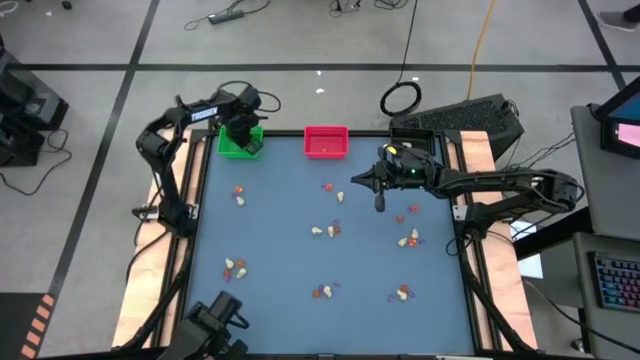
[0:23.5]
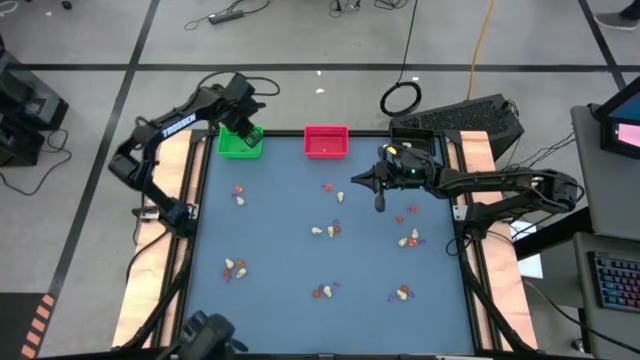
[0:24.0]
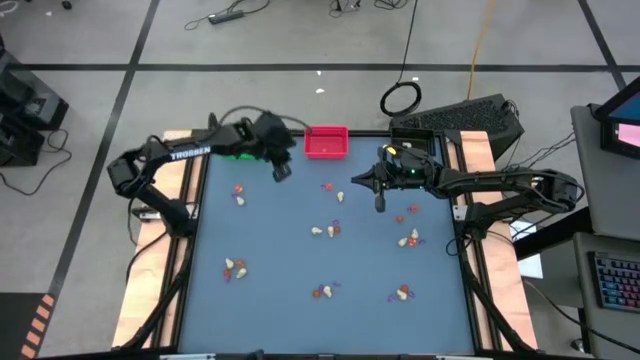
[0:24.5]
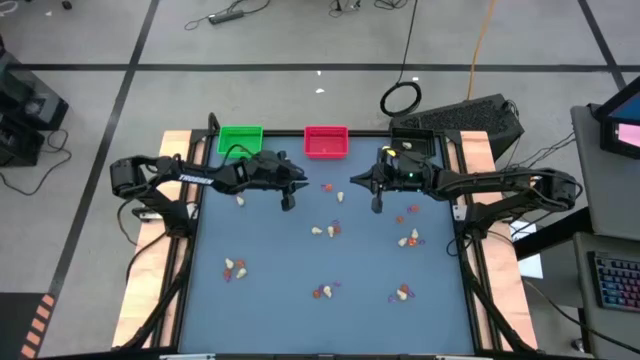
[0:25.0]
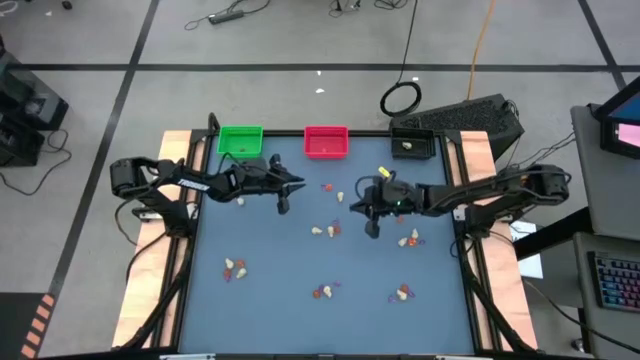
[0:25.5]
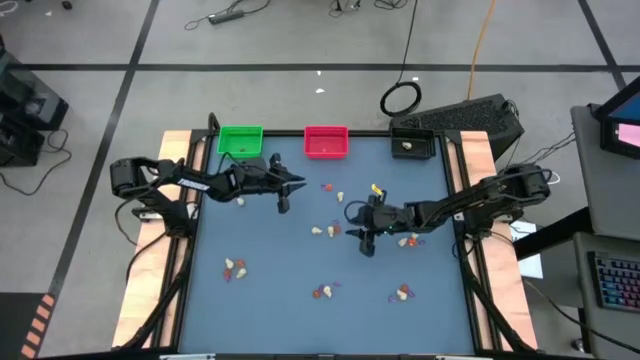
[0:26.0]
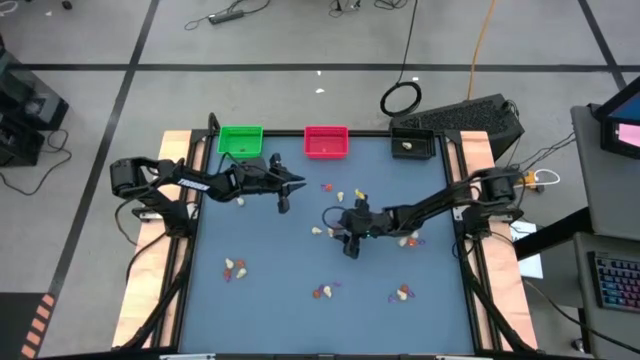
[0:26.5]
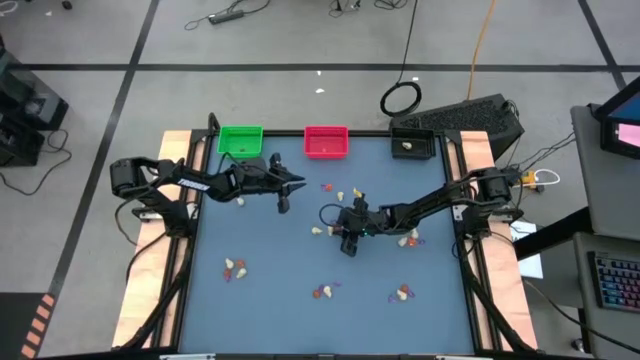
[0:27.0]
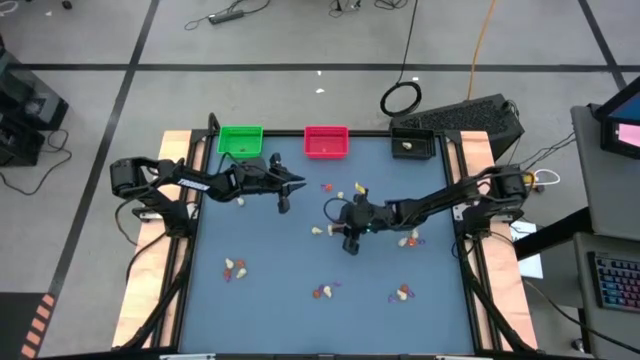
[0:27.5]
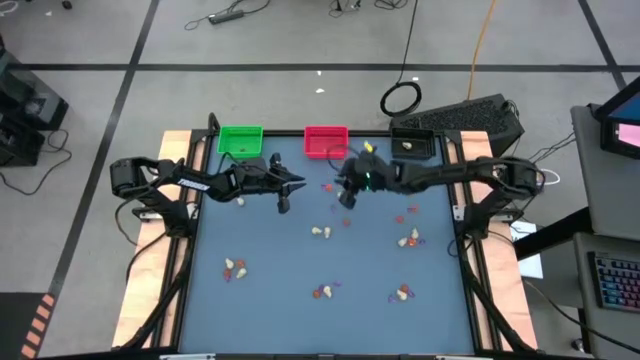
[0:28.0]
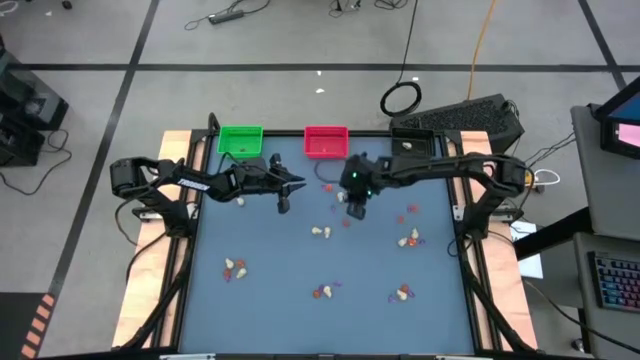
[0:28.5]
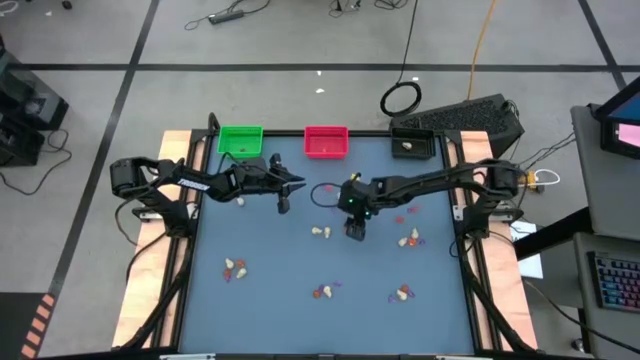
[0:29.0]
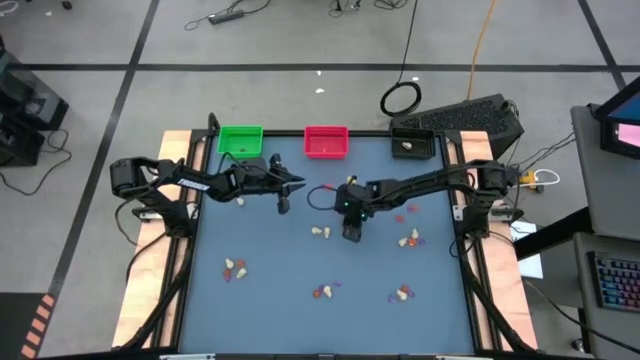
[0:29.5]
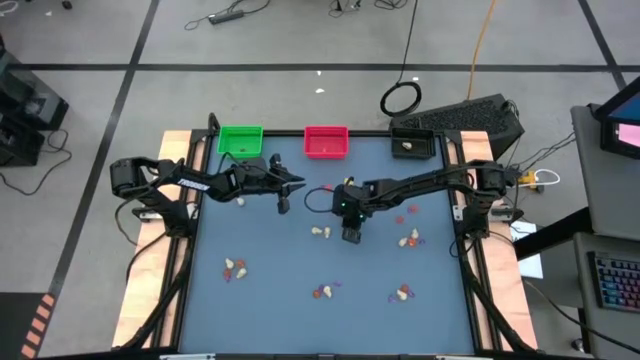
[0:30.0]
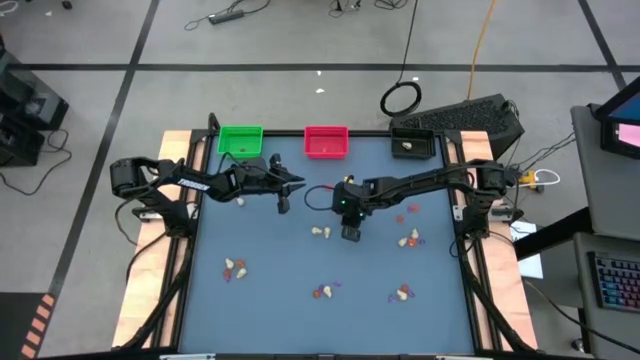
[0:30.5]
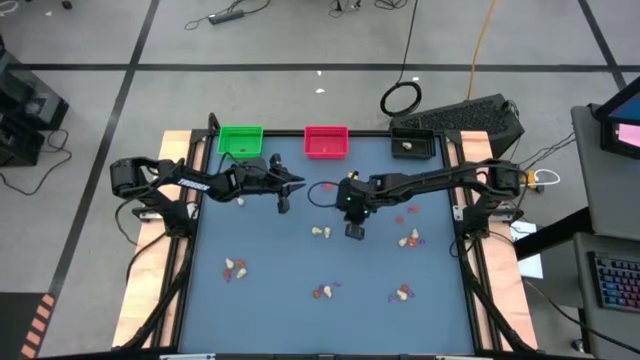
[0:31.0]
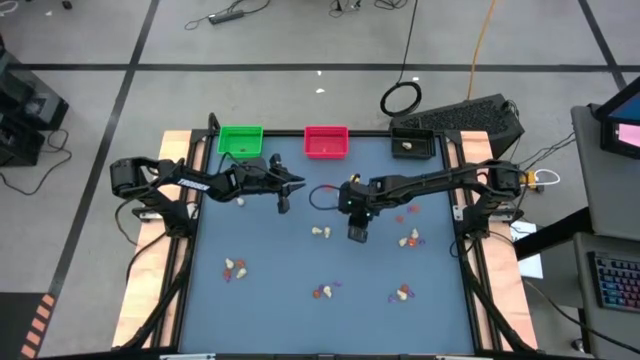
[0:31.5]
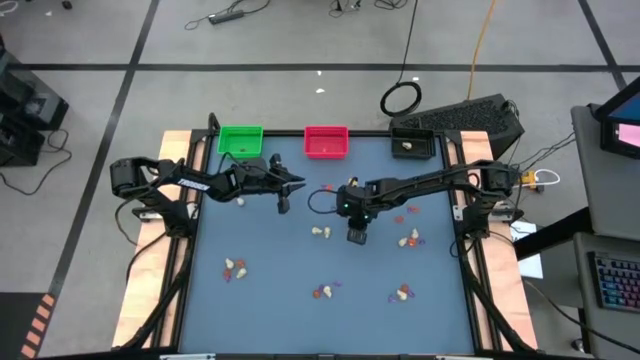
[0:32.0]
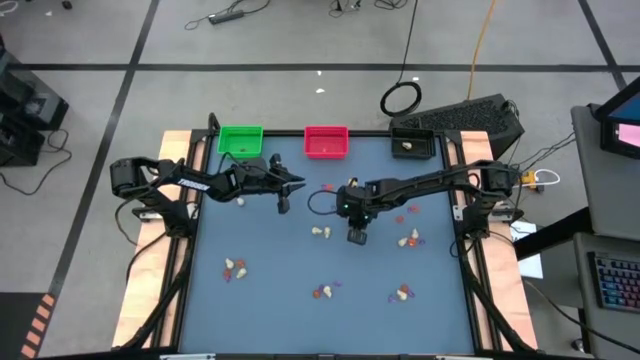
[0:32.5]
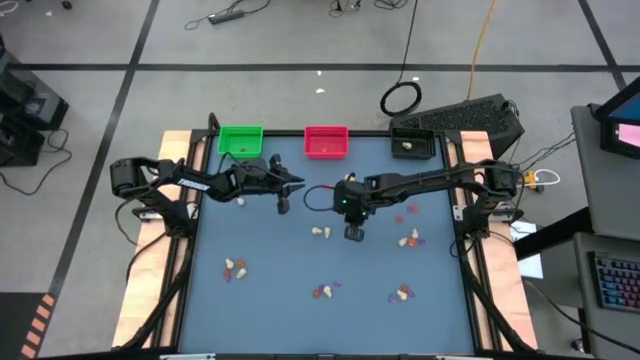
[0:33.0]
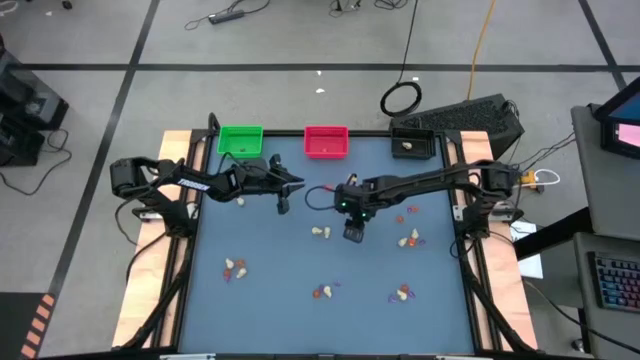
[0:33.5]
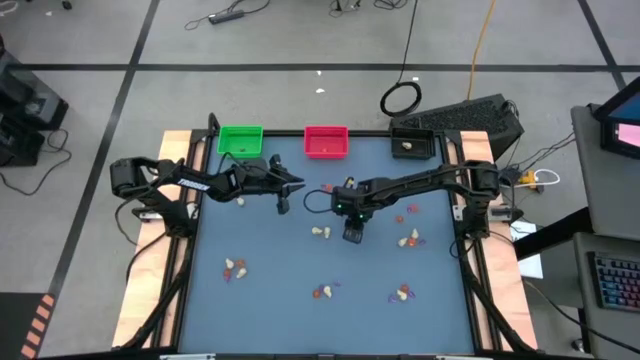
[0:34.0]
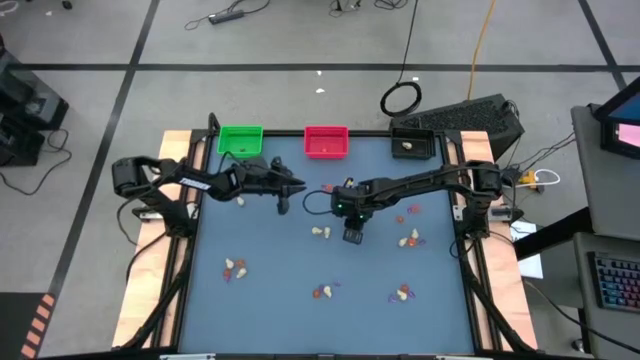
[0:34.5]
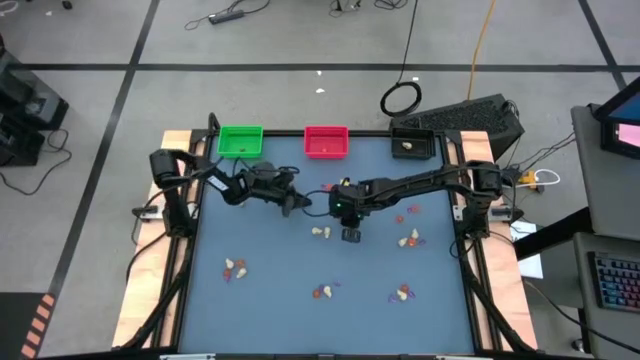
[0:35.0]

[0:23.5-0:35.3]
Task: Sort Halloween decoration
Put the orange pumpkin toy into the red bin

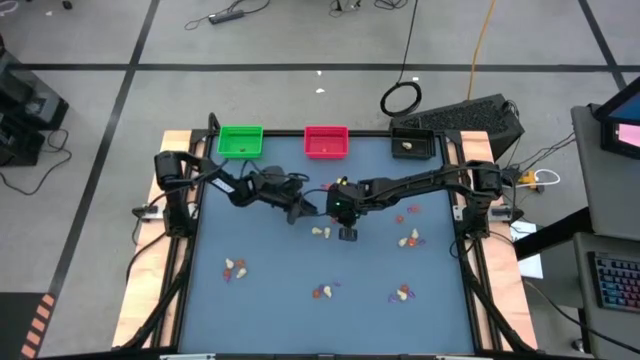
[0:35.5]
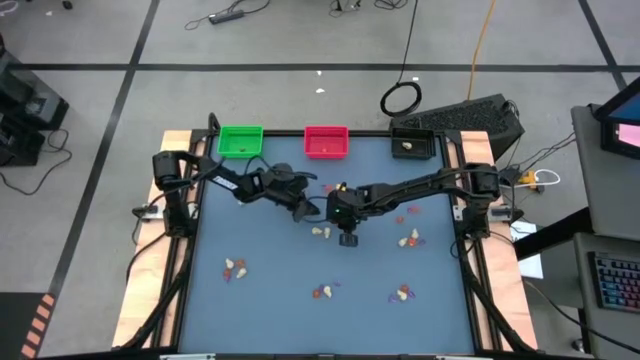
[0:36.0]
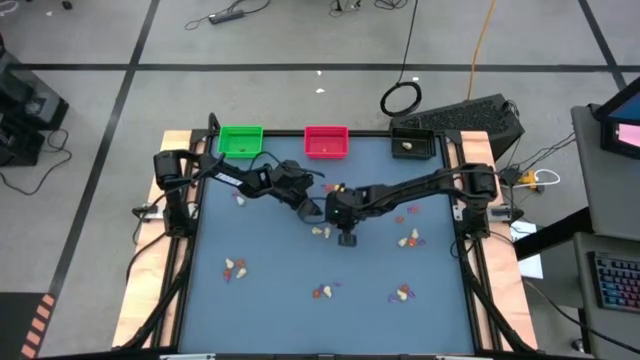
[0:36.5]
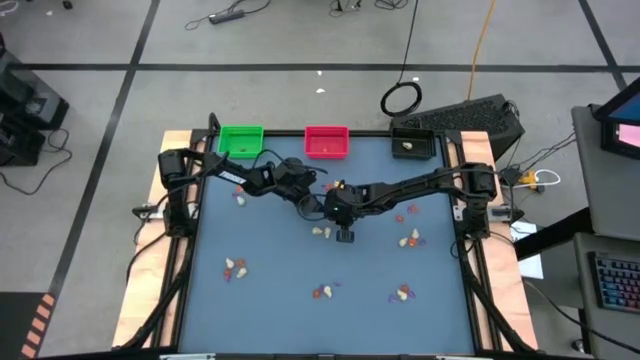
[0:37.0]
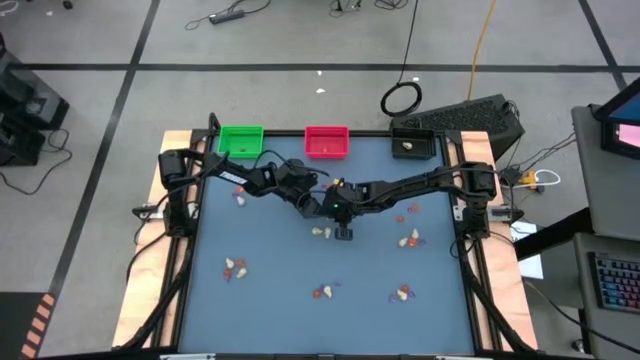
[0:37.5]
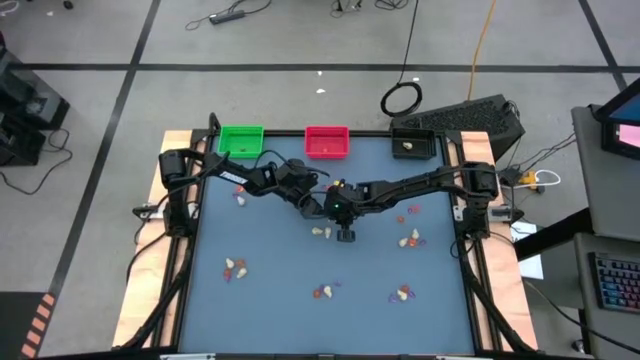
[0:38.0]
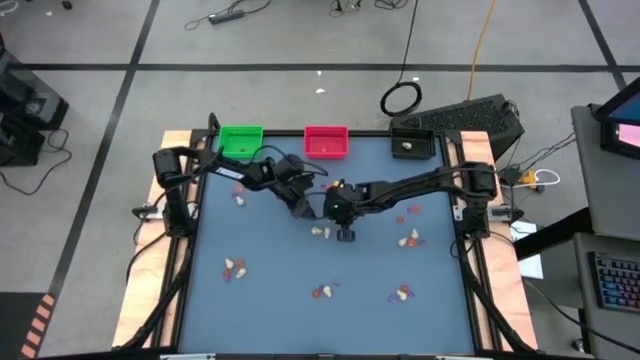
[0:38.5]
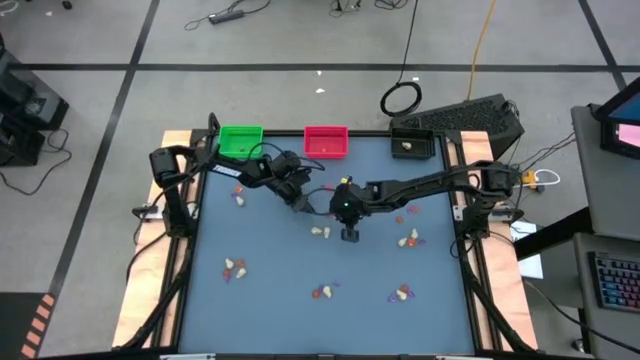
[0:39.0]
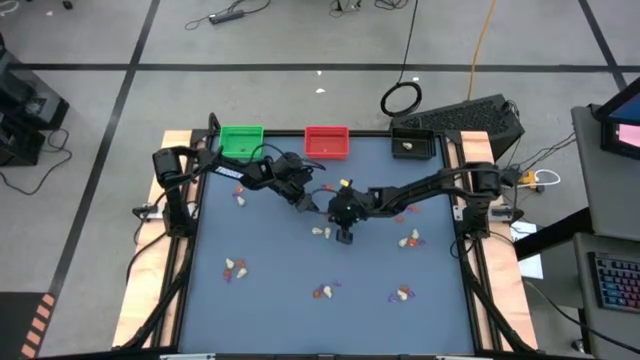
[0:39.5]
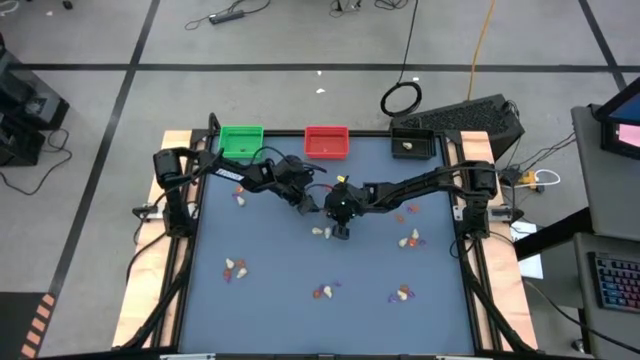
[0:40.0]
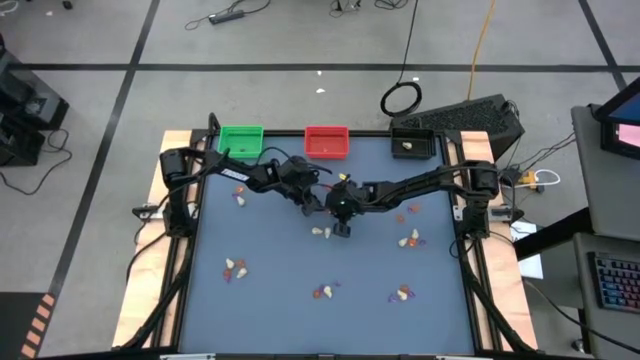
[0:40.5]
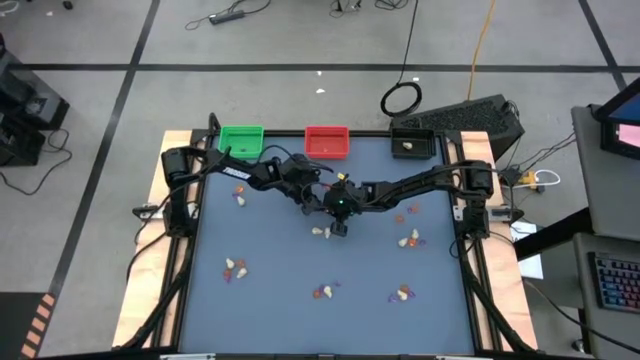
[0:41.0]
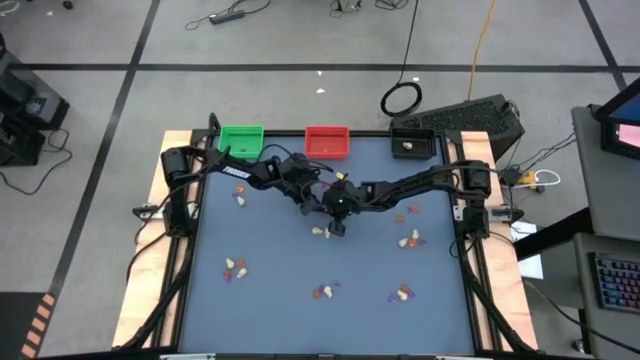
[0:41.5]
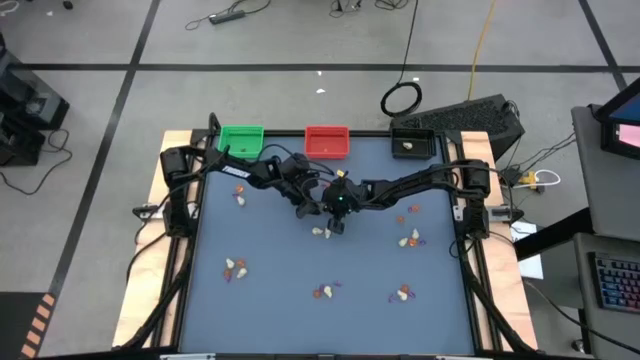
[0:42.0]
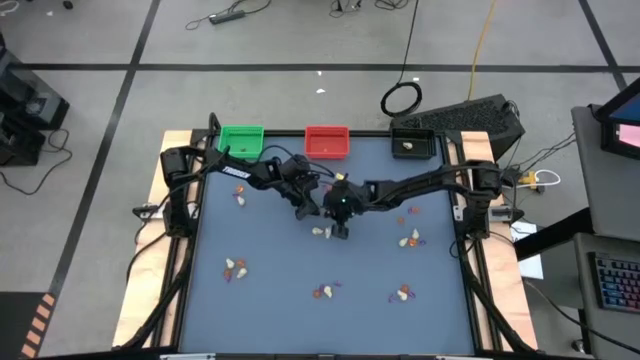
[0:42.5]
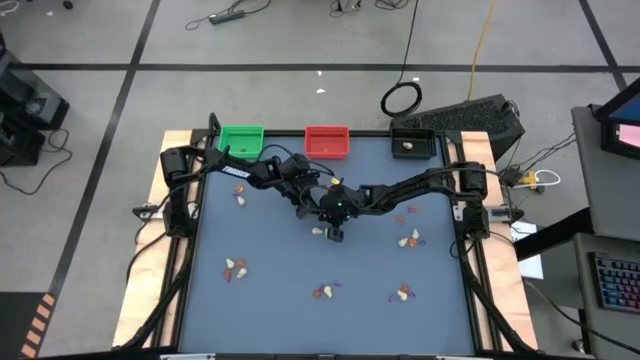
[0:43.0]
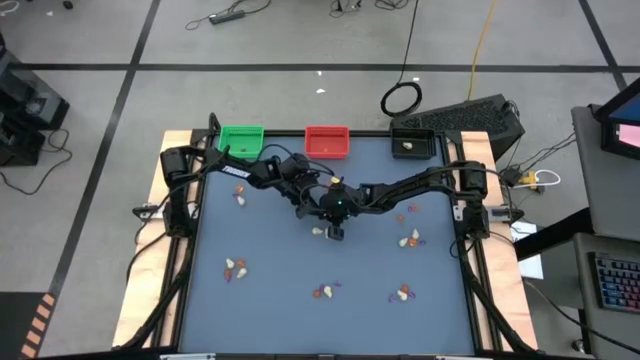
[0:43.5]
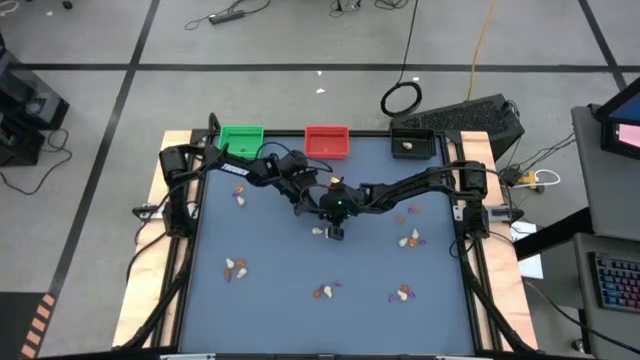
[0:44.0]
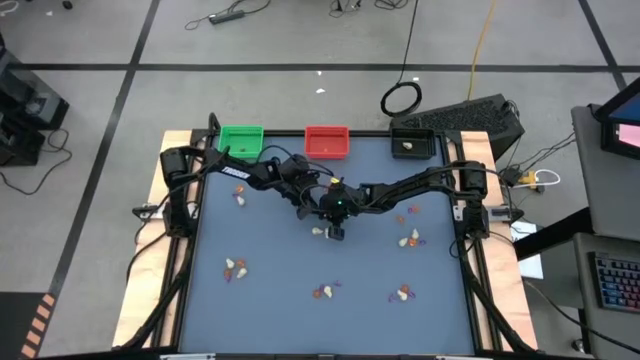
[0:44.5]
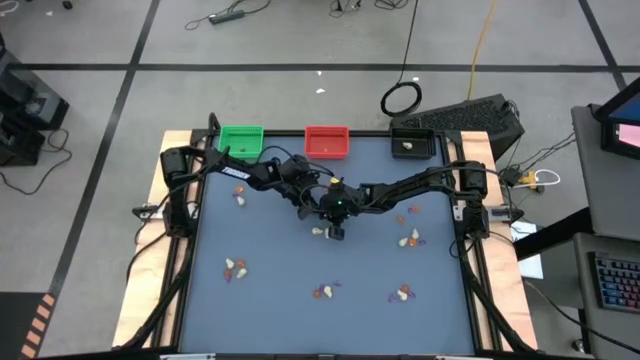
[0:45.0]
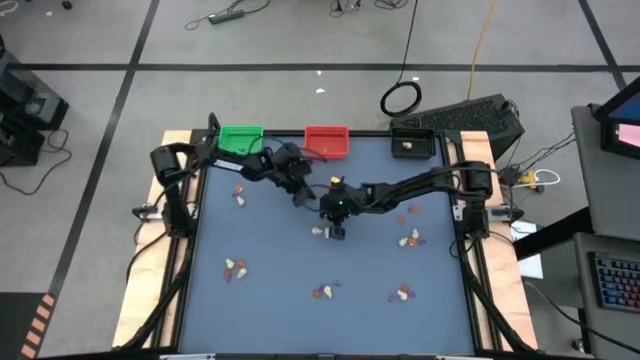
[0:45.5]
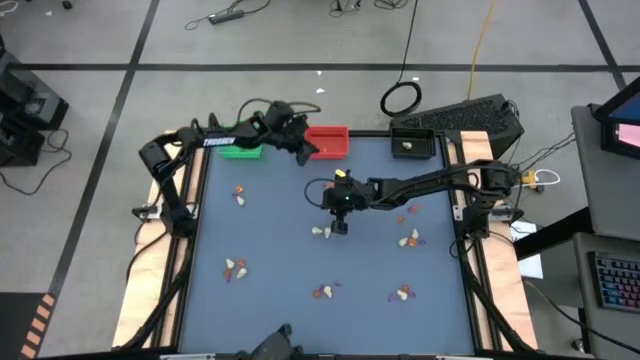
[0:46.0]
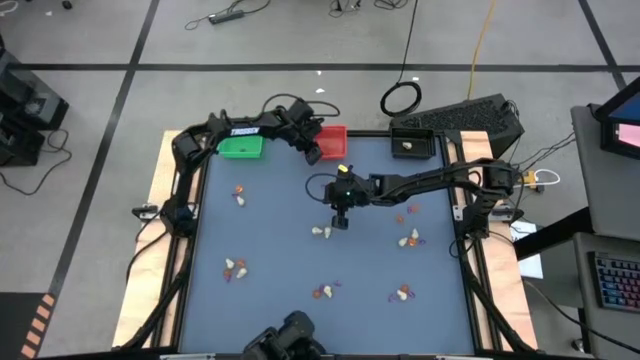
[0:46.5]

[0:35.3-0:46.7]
Put the orange pumpkin toy into the red bin
